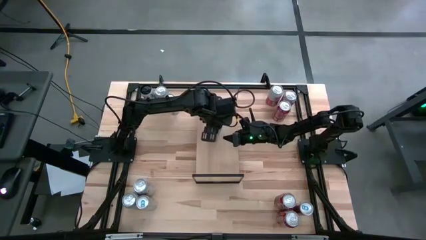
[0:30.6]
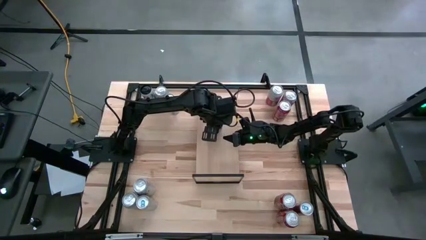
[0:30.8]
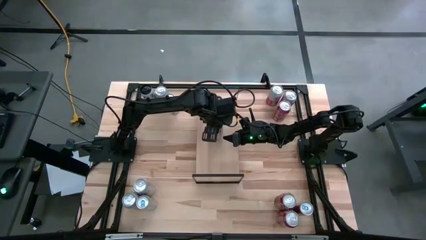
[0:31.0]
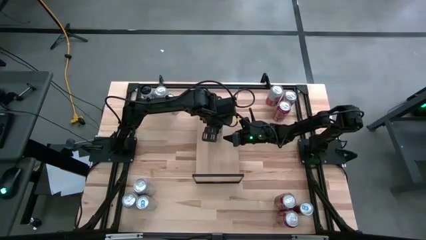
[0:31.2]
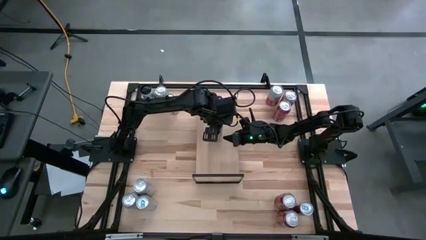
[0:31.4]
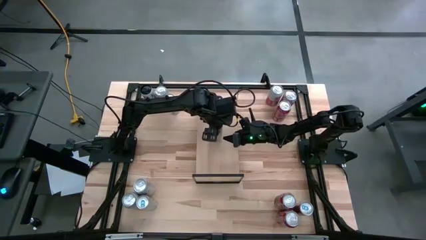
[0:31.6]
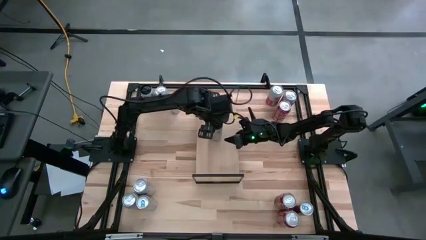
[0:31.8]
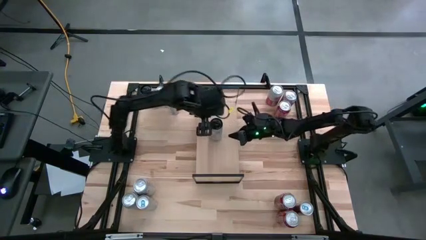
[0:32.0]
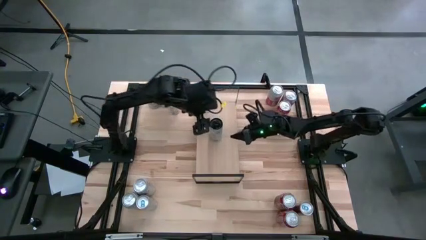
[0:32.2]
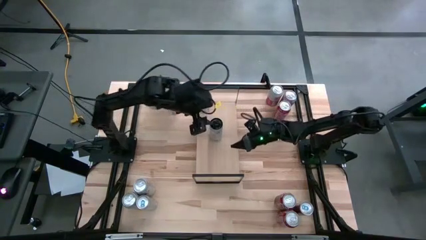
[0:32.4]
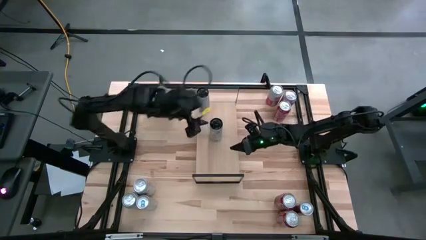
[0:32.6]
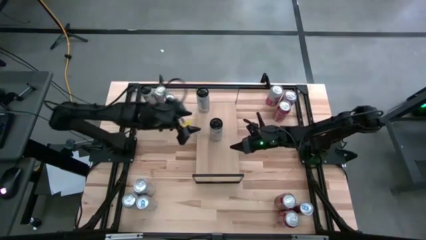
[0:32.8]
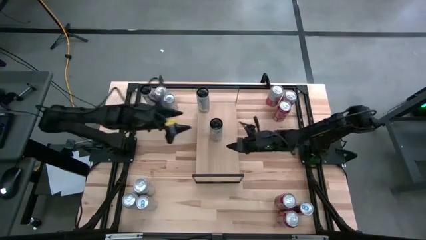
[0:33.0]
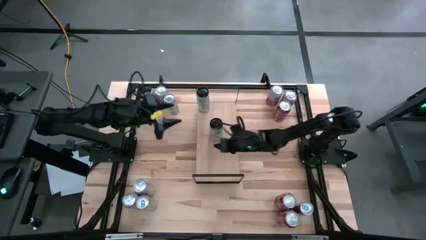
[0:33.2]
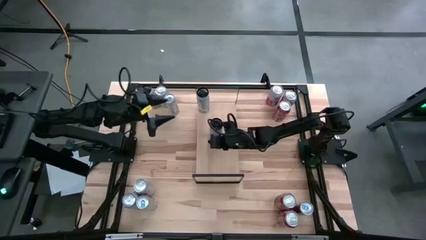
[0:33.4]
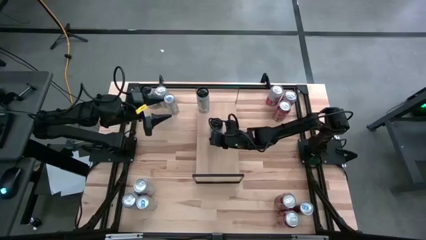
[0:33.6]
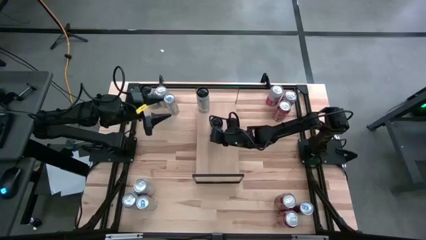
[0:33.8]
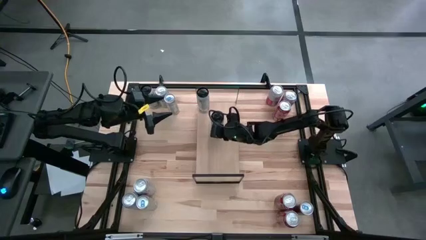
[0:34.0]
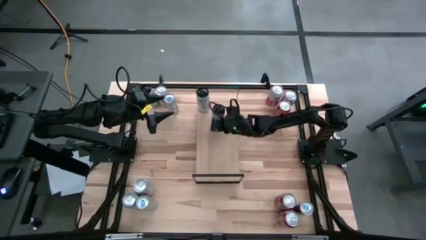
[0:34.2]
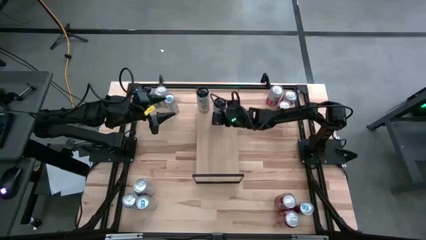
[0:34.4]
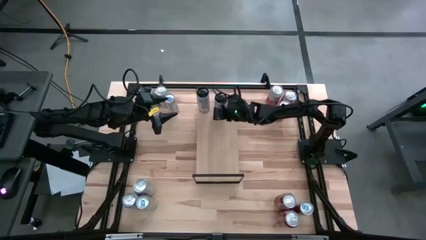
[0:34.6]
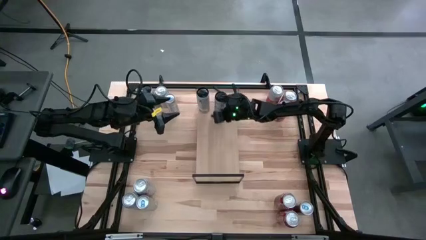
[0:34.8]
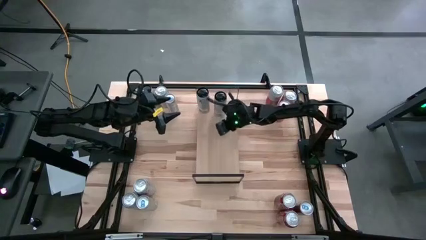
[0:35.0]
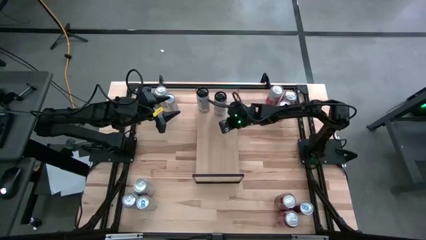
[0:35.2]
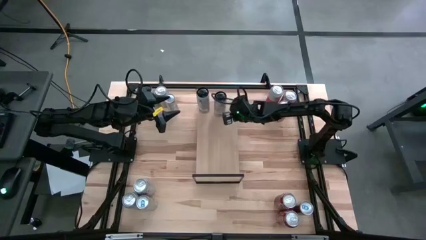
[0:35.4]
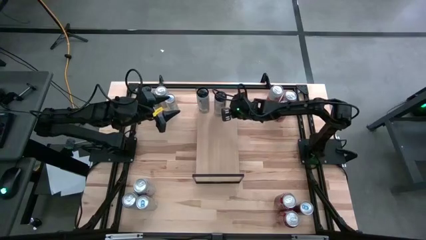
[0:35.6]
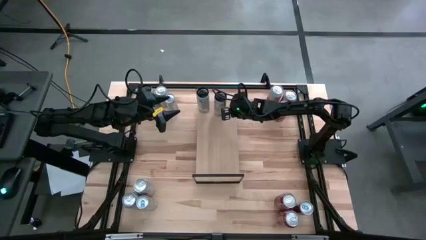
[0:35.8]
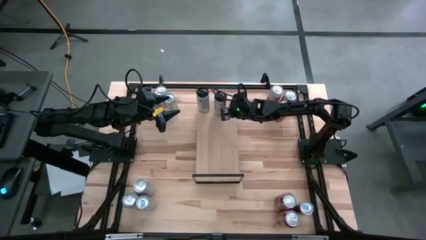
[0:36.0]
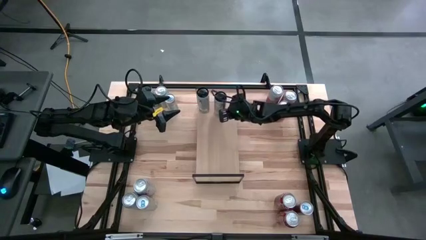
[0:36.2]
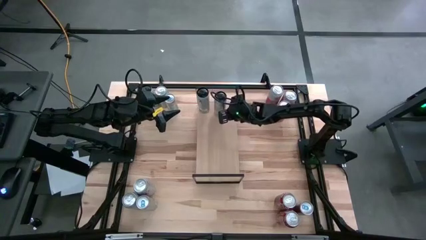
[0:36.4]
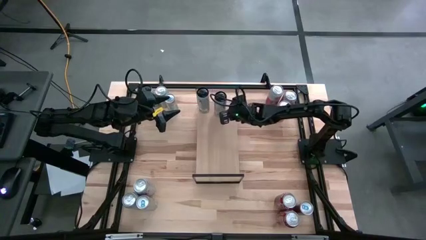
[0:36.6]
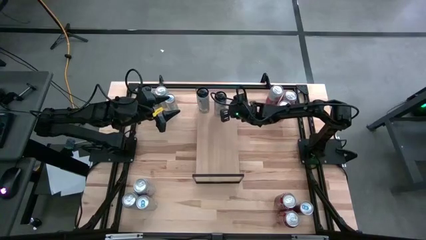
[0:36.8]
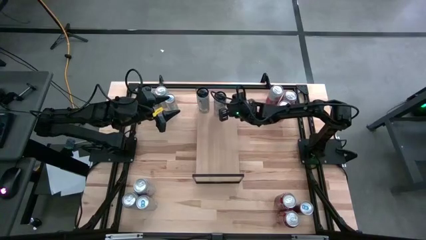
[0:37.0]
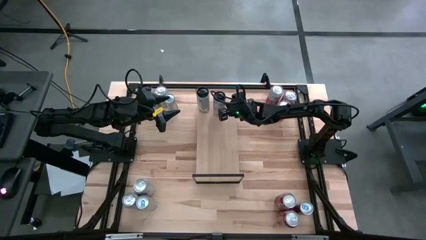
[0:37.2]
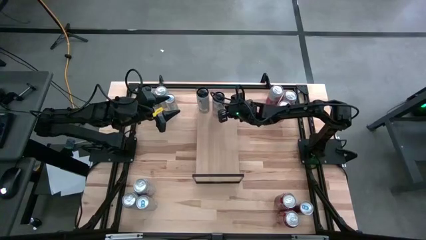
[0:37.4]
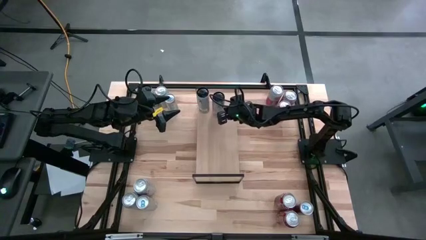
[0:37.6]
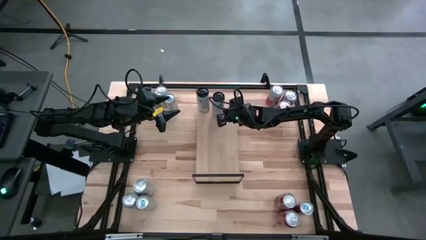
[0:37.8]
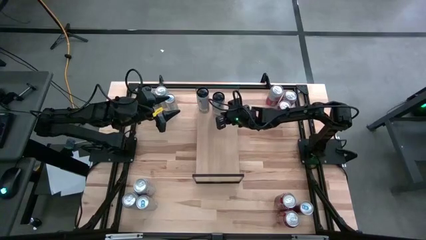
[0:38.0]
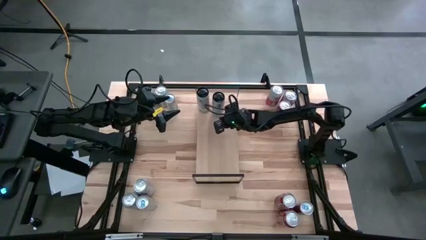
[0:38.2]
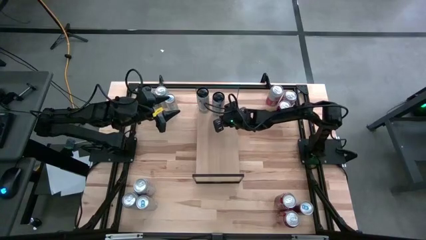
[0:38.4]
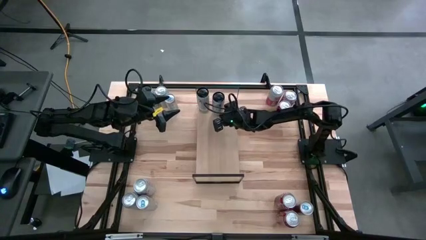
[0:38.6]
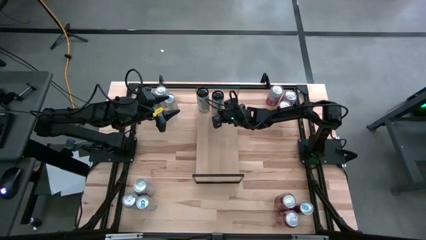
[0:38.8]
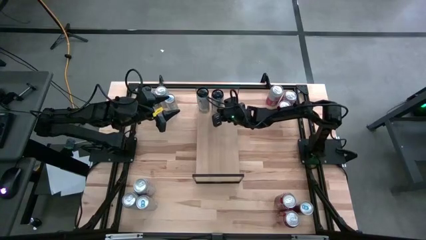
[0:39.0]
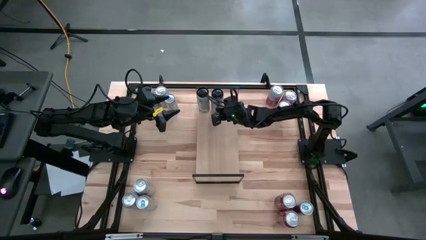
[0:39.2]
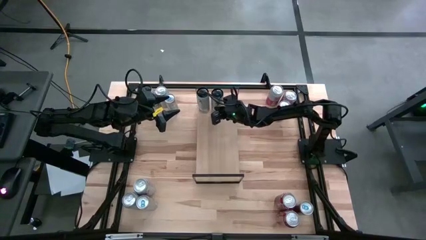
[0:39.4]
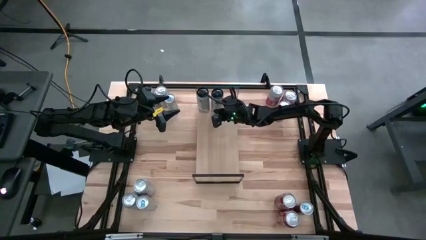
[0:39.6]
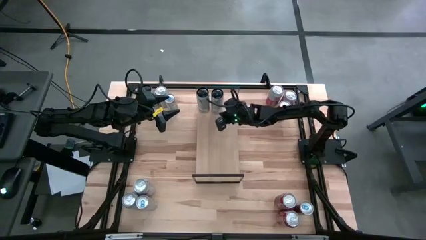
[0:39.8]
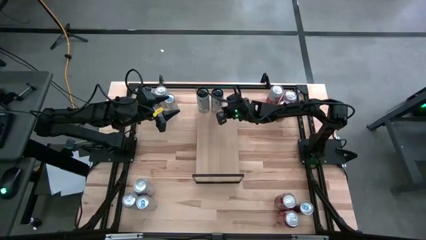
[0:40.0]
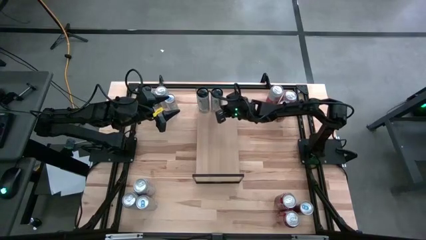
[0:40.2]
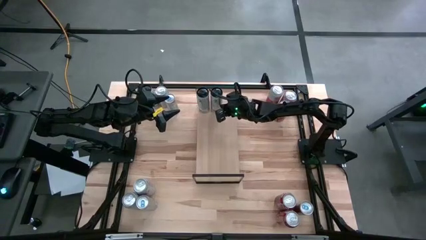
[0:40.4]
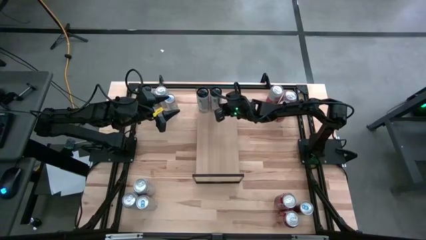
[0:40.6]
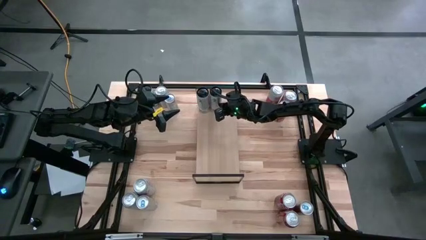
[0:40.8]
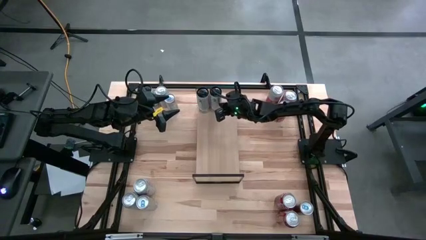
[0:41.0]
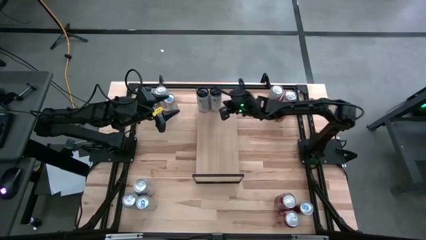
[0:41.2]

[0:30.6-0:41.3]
Task: Place canned beverage on shelf
Put the bottom white-pink soda can on the shelf aligned with the other white-pink soda can

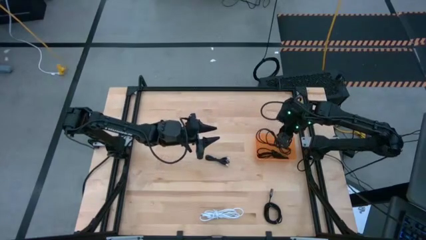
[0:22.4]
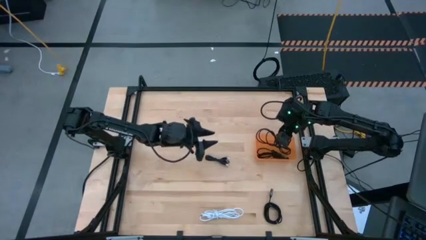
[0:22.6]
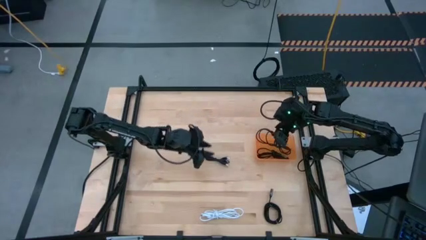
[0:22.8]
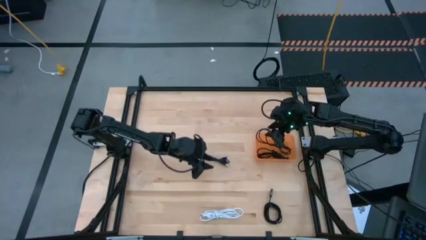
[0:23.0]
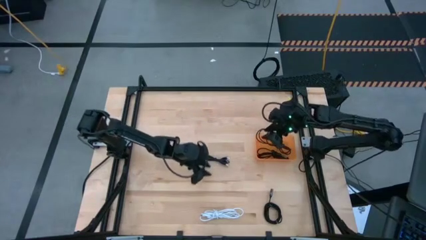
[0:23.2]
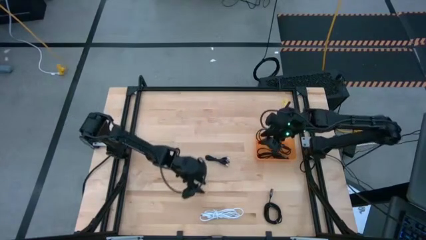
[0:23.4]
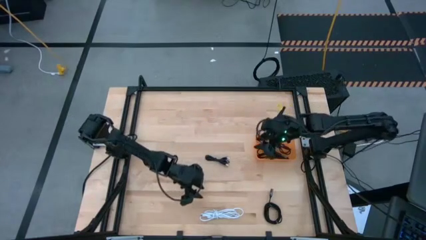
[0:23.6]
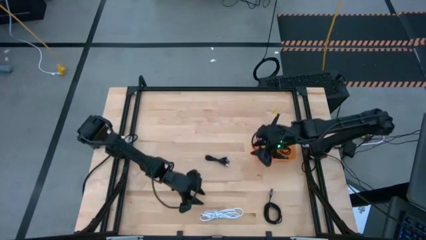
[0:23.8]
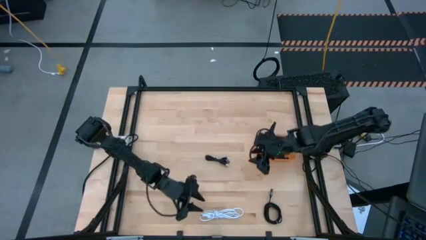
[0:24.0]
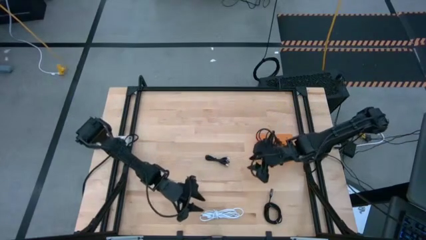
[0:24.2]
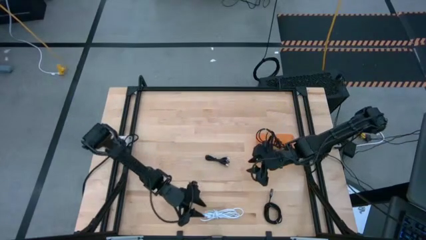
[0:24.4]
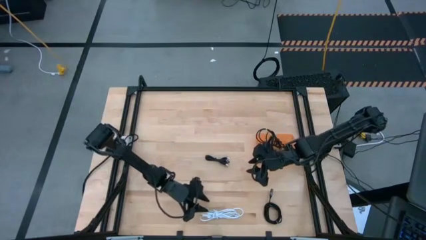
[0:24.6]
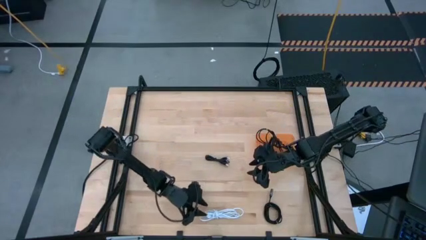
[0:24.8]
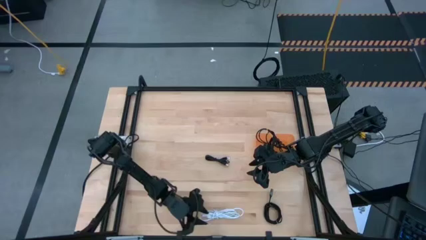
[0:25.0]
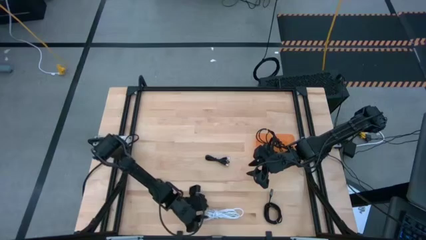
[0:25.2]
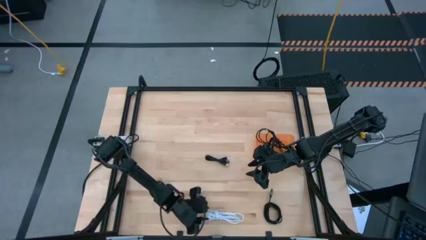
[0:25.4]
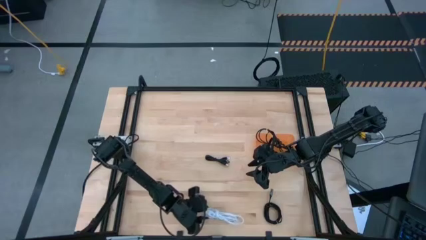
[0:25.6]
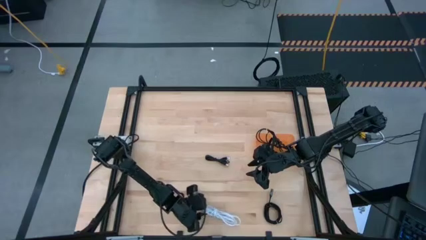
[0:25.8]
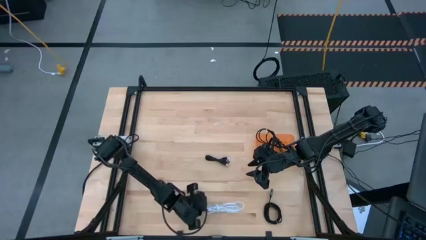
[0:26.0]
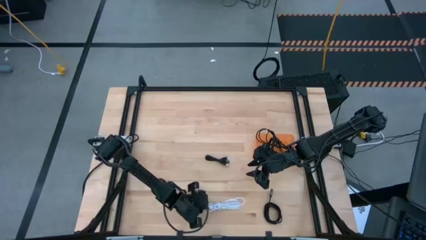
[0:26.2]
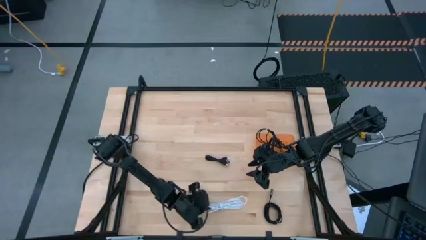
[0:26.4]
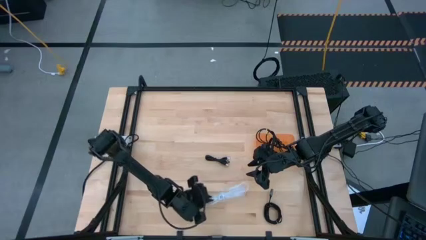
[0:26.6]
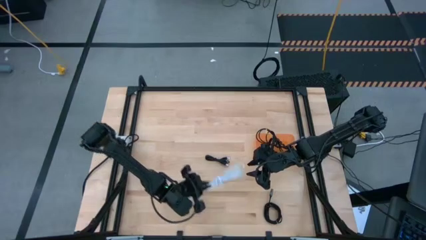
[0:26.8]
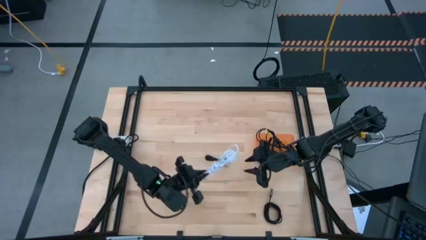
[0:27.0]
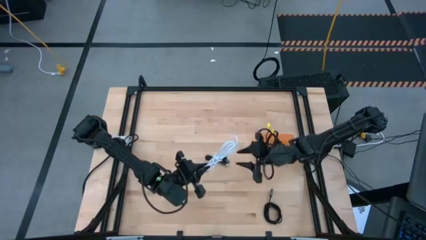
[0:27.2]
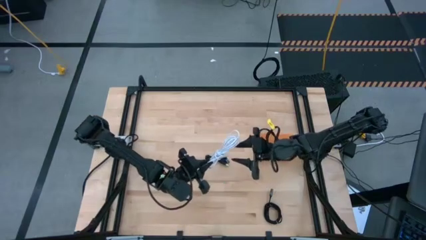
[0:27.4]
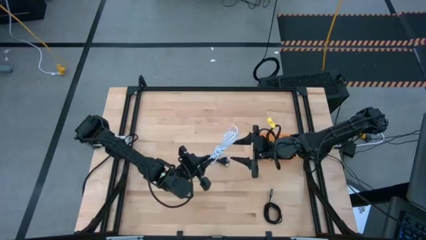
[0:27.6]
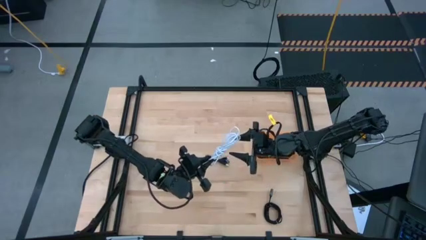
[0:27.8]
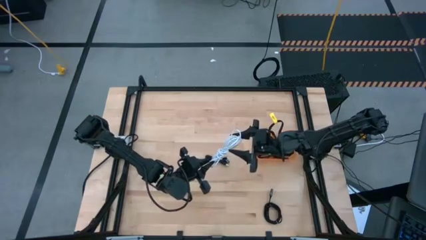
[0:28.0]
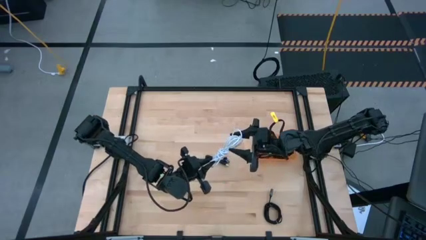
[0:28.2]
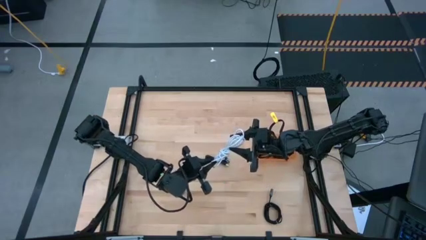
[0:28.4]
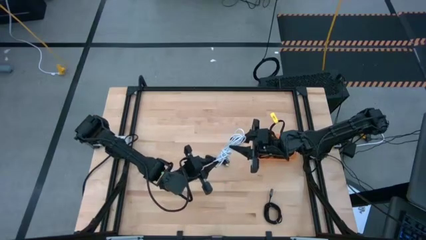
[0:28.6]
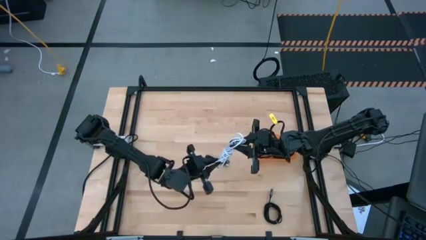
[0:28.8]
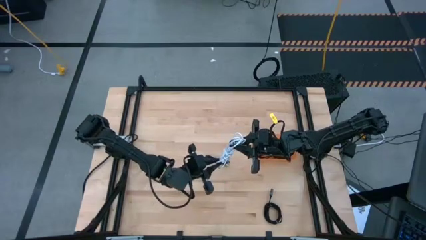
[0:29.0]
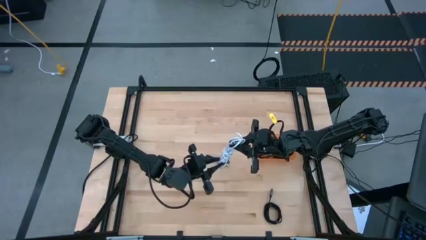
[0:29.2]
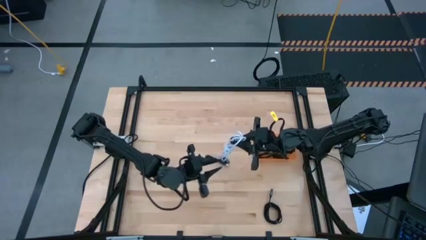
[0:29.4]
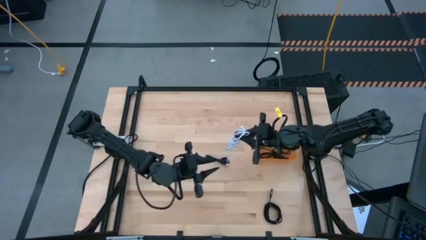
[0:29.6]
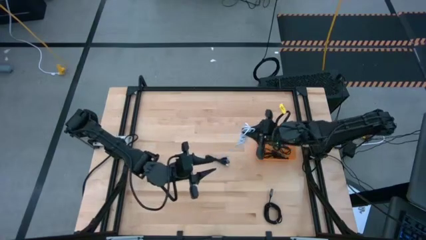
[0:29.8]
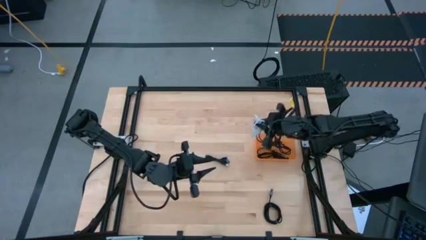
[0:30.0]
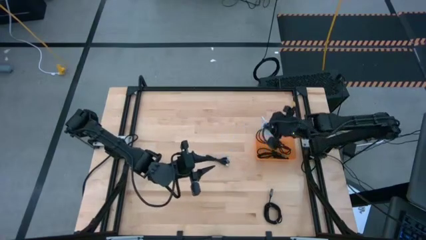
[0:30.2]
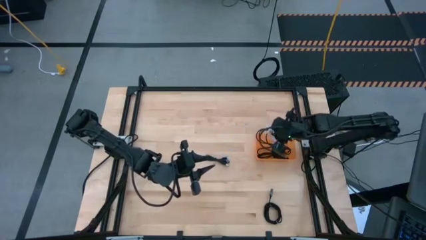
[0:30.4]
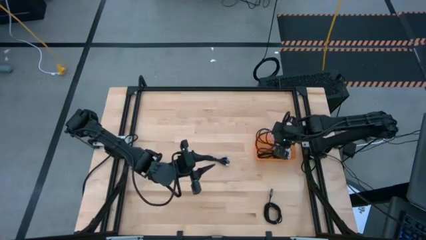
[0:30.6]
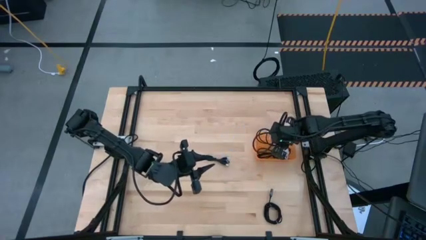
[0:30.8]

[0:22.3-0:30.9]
Task: Pick and place USB-C Cables
Put the white charger cable into the bin
